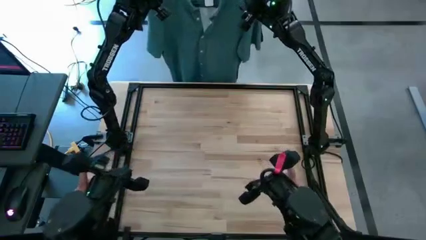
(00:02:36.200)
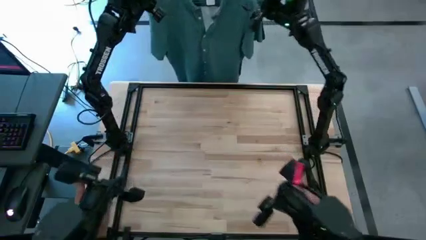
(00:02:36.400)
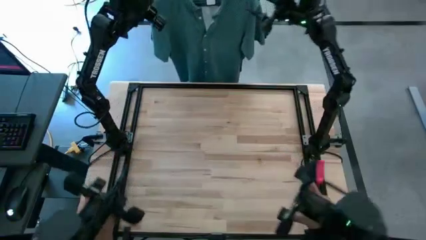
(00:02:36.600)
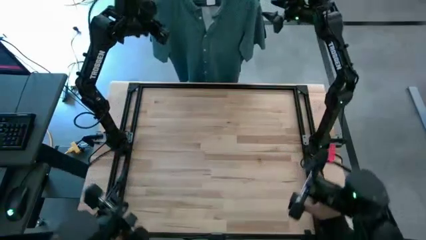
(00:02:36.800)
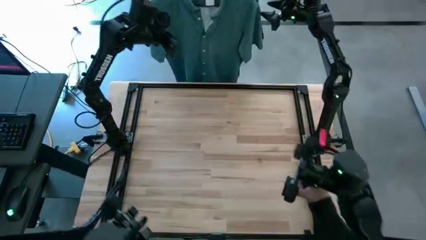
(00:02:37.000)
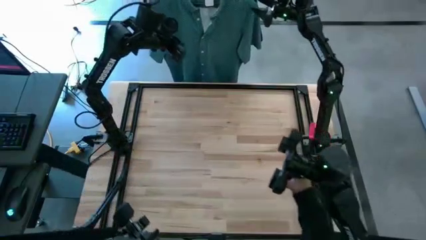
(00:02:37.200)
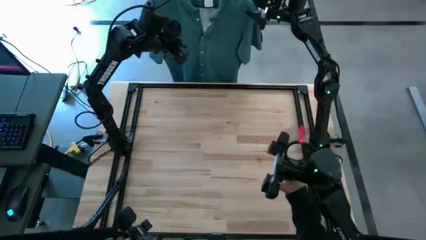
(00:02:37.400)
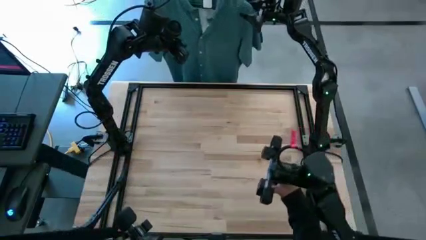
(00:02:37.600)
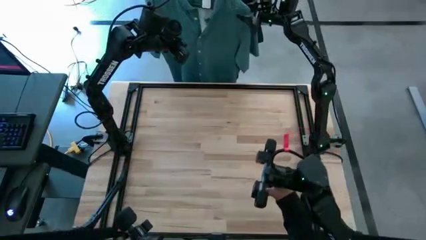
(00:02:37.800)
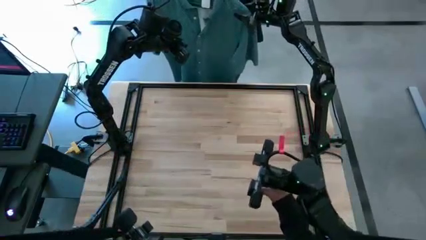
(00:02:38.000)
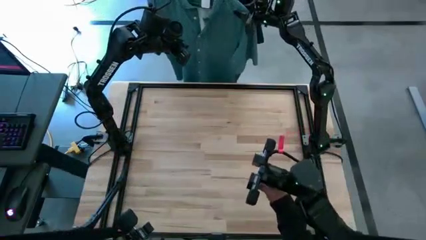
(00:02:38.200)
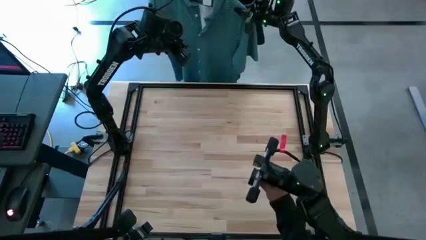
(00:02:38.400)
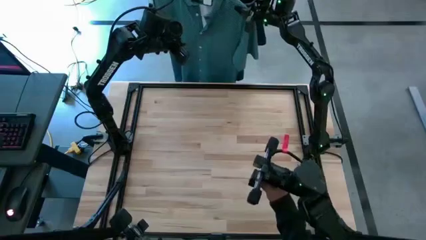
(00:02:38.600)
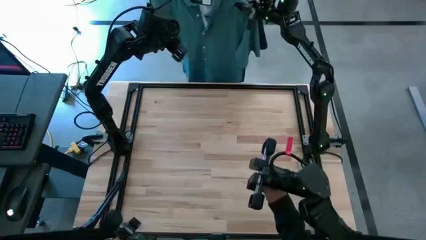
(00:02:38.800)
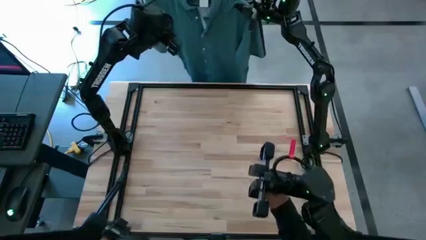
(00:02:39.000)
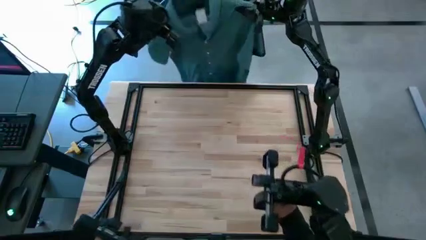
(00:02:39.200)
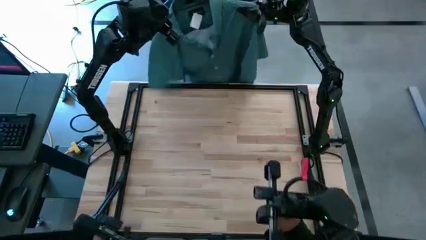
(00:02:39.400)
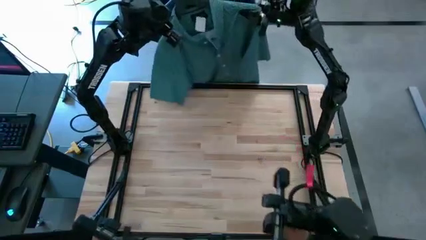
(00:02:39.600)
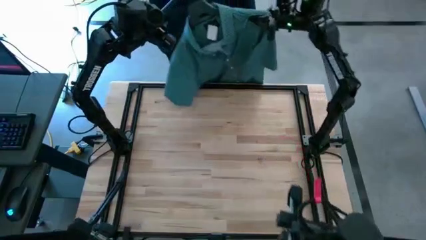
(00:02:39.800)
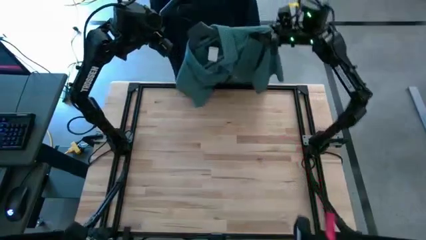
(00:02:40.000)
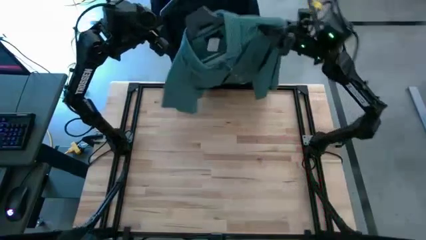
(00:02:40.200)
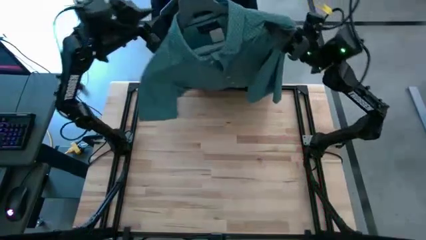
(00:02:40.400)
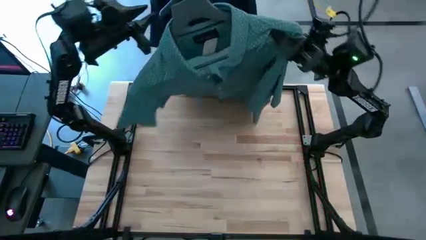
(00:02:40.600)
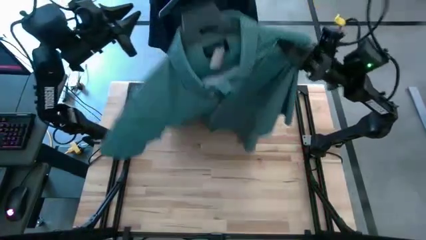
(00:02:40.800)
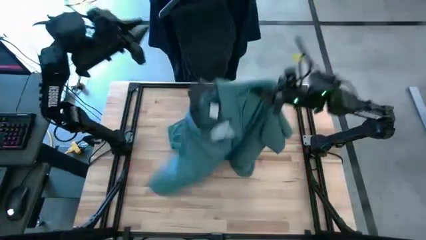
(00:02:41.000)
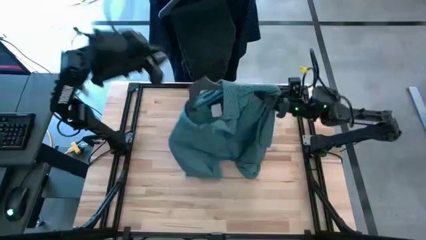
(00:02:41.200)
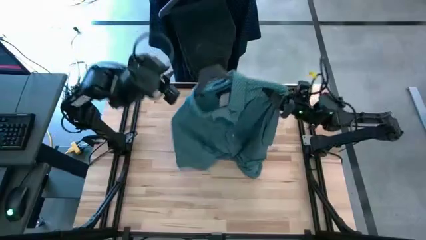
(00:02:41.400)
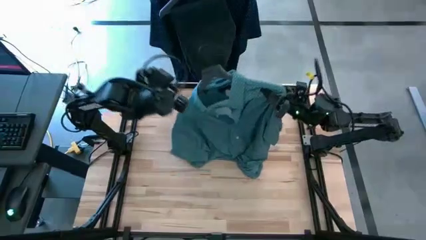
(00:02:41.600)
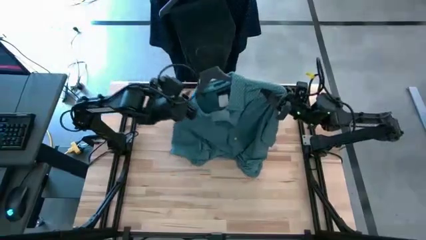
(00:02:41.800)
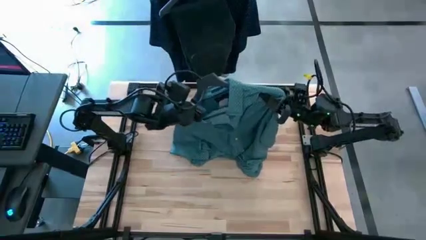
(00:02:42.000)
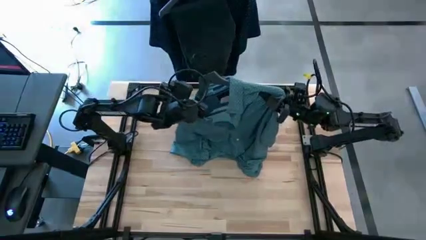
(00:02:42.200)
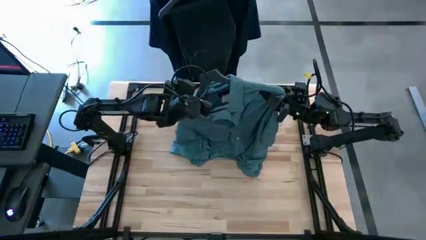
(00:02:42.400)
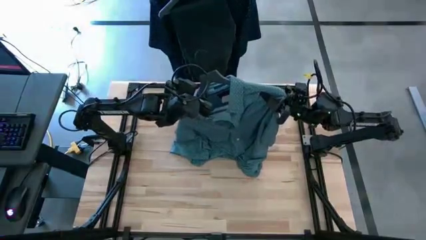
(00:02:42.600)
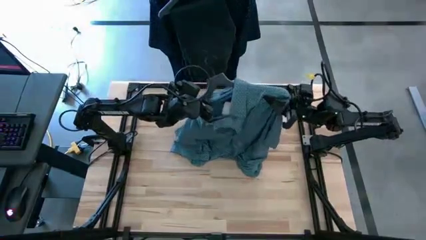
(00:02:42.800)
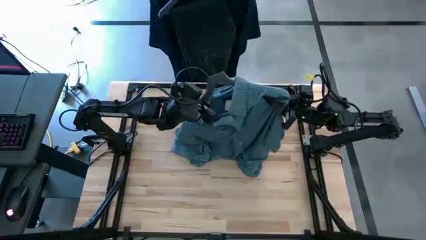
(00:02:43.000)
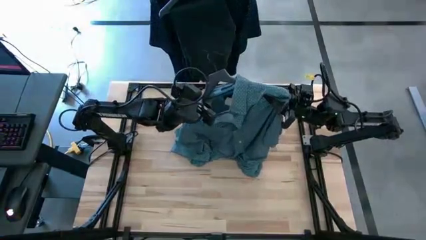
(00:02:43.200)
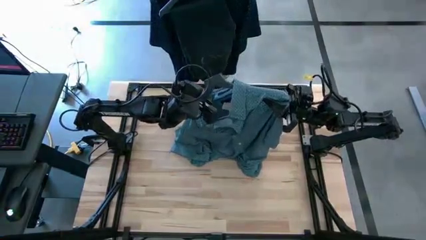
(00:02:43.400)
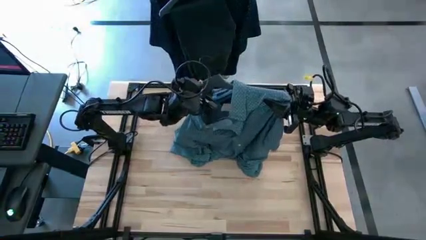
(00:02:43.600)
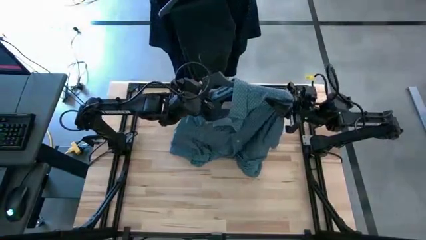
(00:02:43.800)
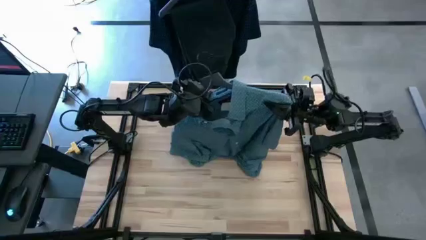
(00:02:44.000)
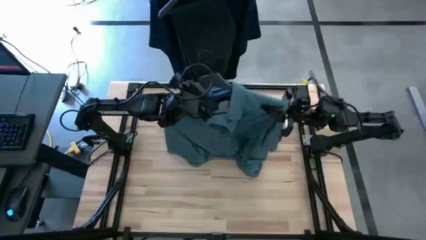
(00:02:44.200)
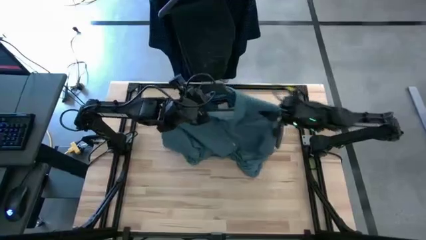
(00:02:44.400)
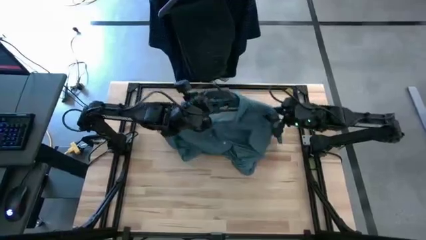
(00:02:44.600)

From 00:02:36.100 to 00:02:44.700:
Task: Hang clothes
Unhang the hangered light blue polo shirt from the hanger racked

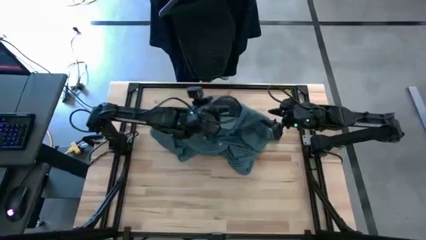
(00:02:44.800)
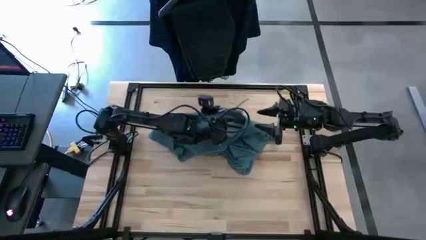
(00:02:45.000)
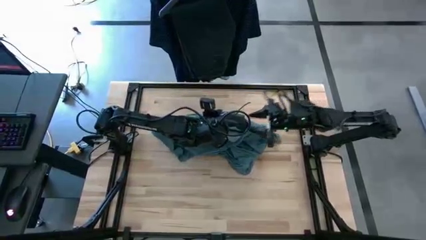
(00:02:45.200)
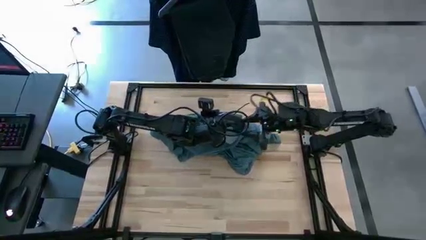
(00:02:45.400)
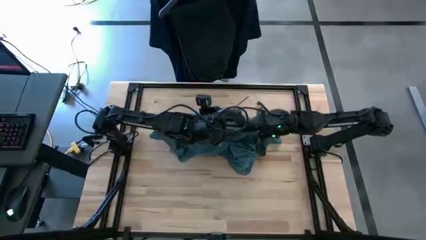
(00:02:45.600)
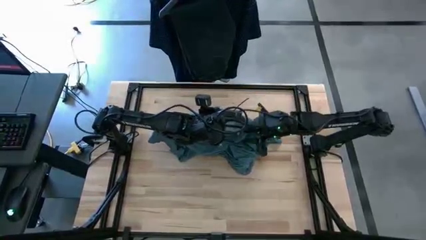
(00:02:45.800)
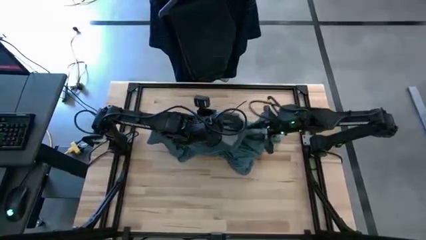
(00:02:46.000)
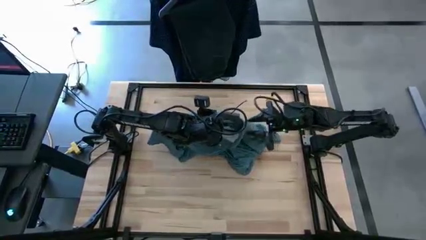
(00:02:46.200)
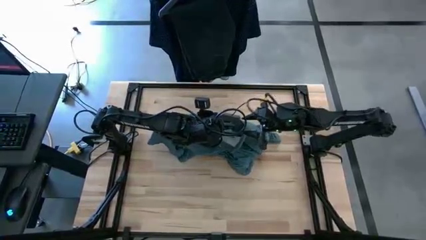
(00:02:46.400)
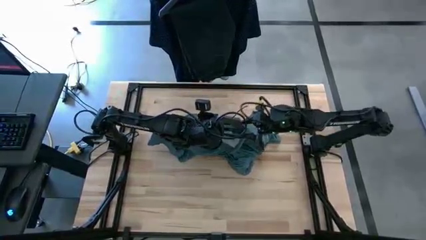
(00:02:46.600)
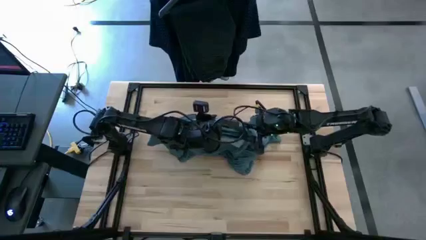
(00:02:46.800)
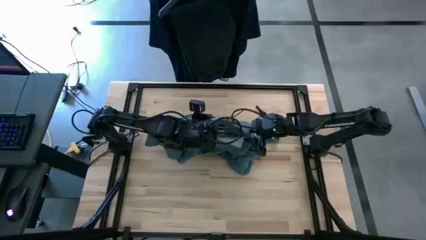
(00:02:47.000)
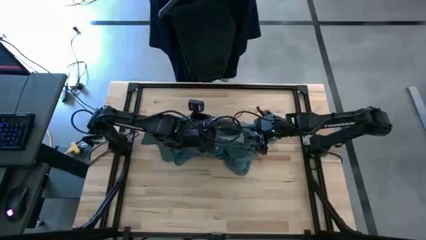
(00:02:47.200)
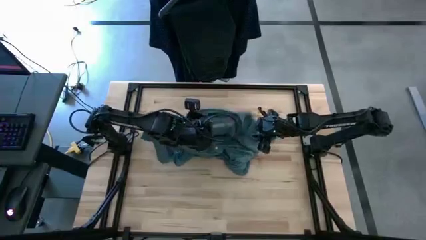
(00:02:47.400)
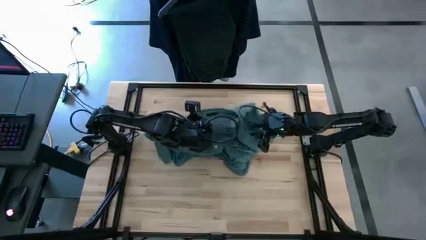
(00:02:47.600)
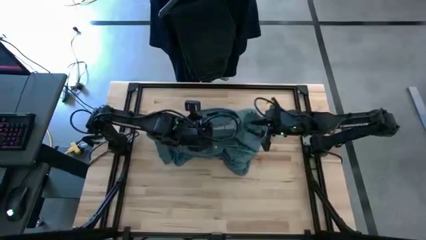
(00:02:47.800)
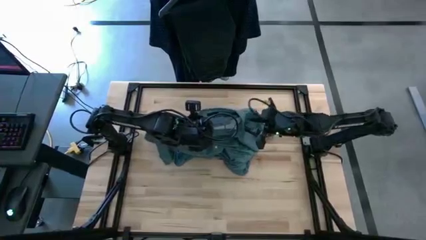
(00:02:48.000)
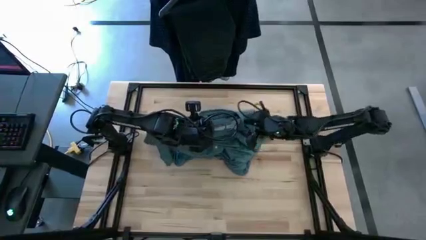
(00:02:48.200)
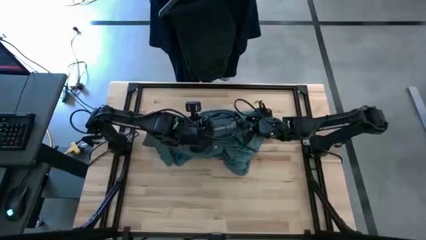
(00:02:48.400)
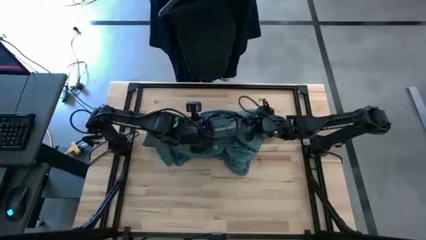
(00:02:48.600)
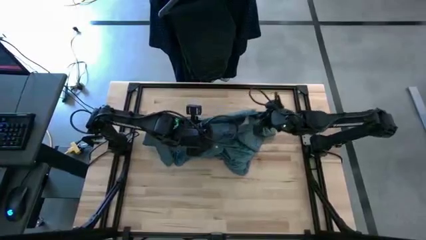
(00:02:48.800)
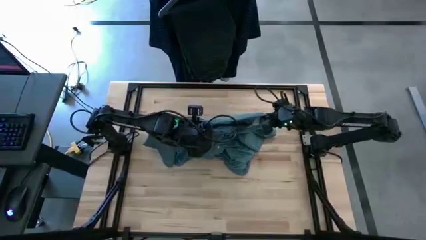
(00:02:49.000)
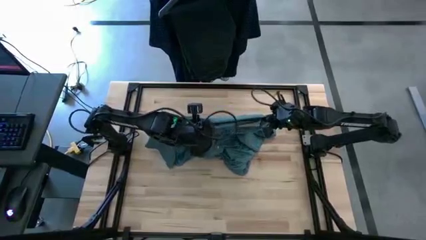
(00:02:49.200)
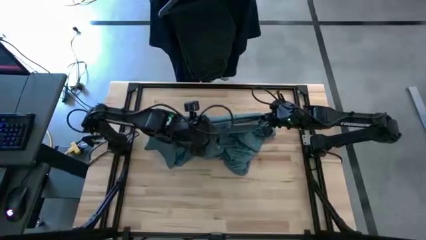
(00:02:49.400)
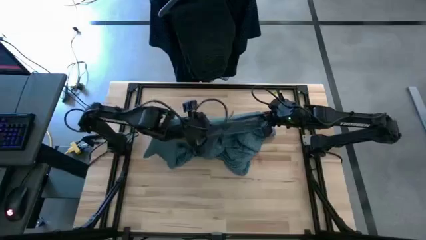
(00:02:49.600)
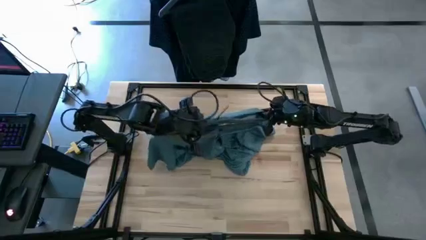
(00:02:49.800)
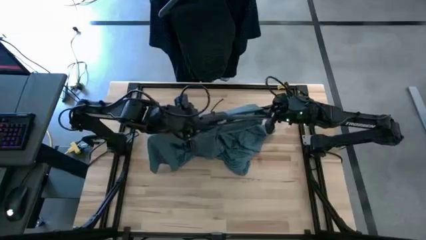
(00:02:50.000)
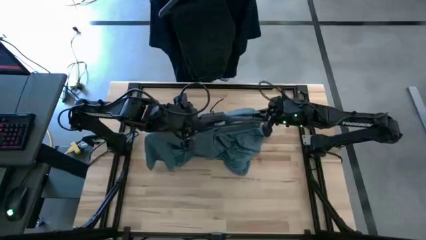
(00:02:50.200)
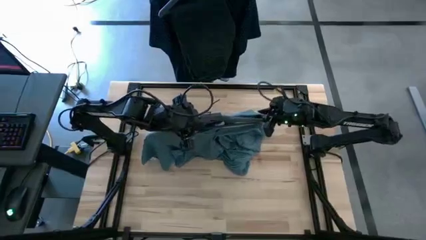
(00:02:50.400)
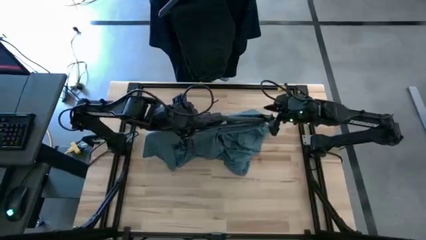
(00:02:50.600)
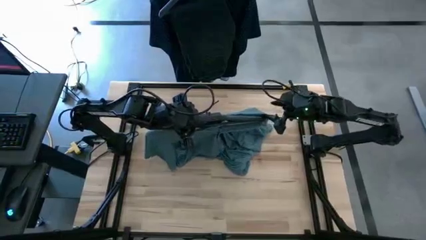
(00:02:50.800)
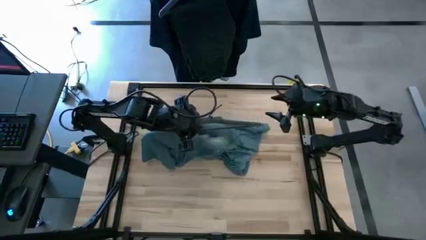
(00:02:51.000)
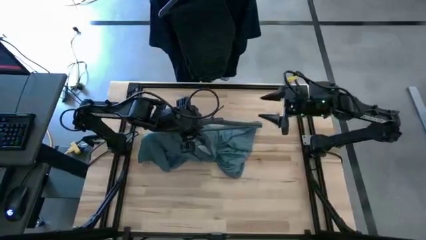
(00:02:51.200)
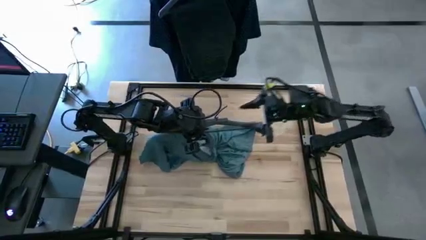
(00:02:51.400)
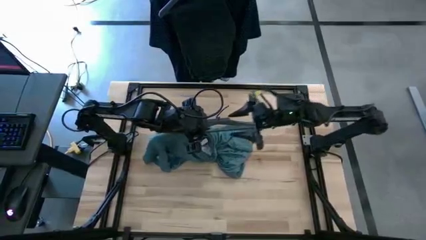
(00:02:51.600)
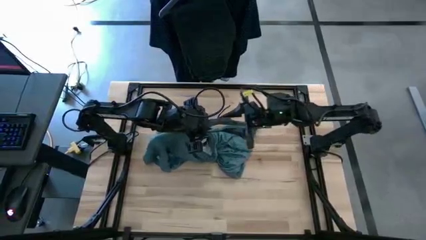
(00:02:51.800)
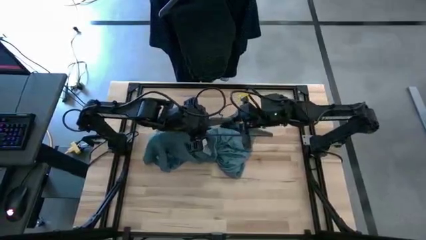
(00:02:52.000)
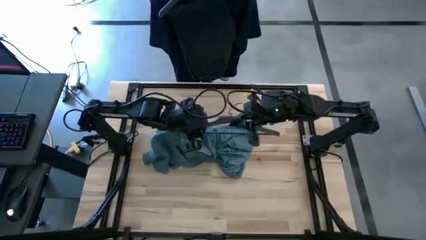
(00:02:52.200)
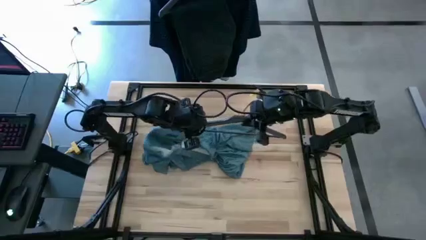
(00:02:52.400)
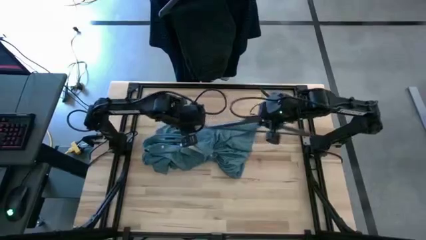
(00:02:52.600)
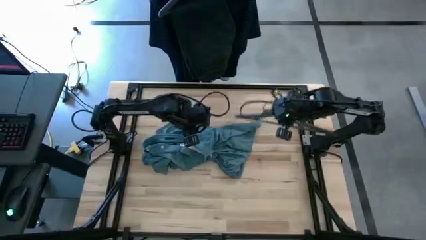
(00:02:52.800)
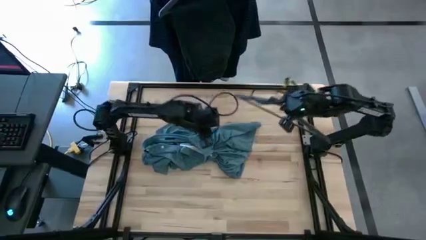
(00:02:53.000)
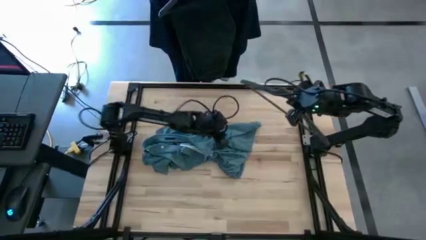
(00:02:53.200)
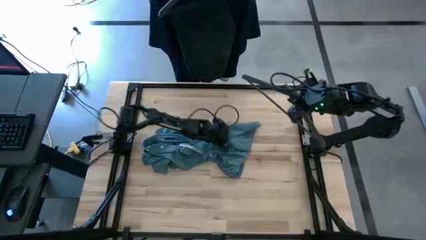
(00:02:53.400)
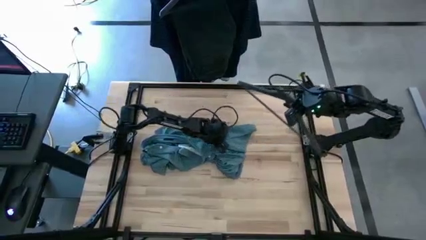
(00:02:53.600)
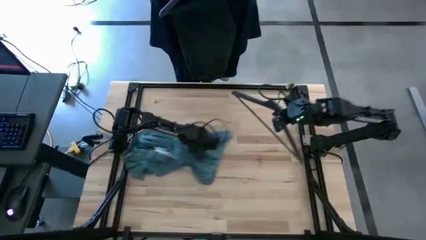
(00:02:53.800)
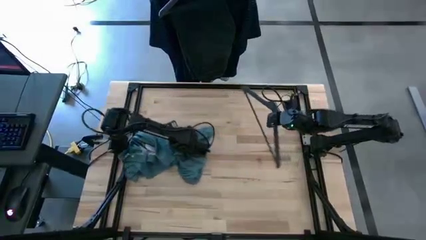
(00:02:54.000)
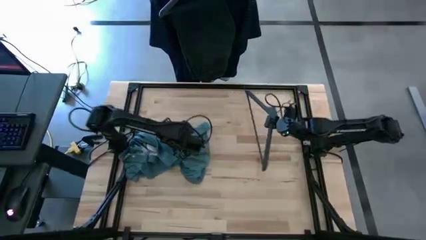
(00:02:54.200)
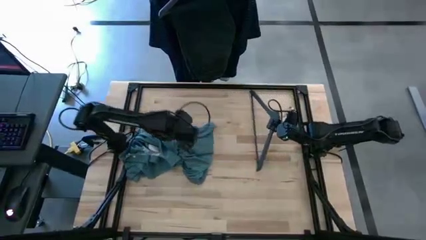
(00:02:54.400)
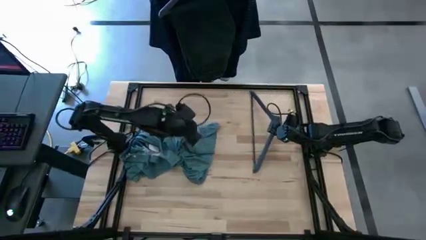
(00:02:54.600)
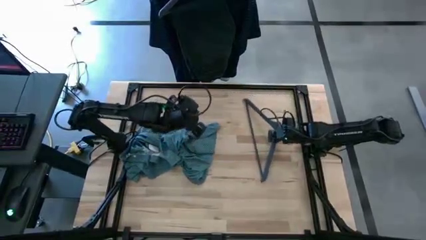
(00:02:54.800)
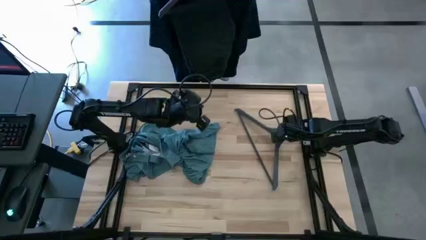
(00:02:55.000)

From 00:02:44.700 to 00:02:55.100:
Remove the hanger from the light blue polo shirt
